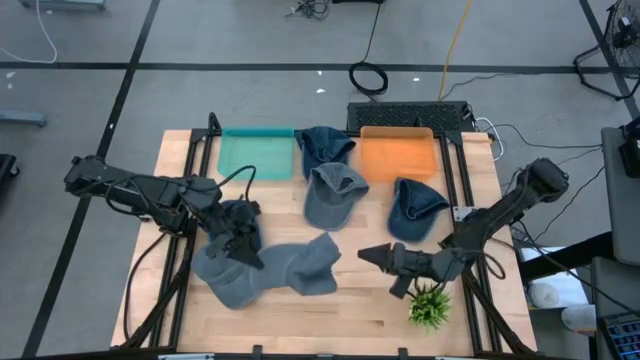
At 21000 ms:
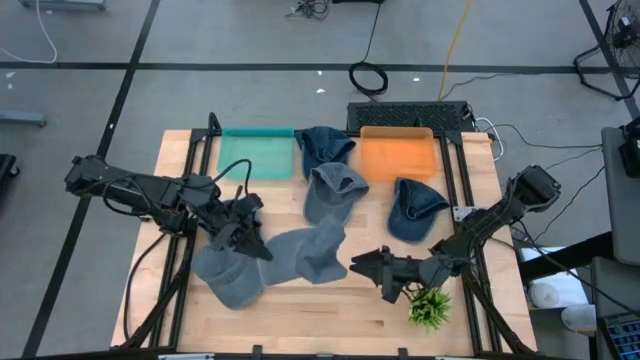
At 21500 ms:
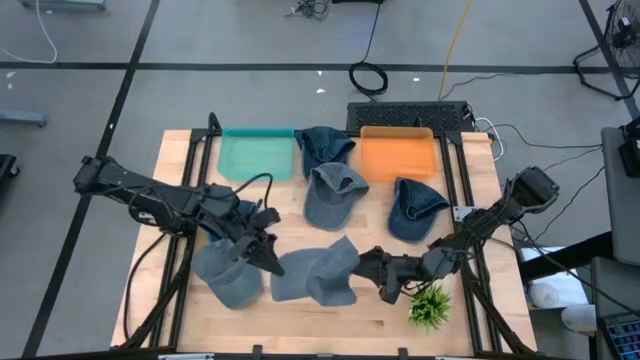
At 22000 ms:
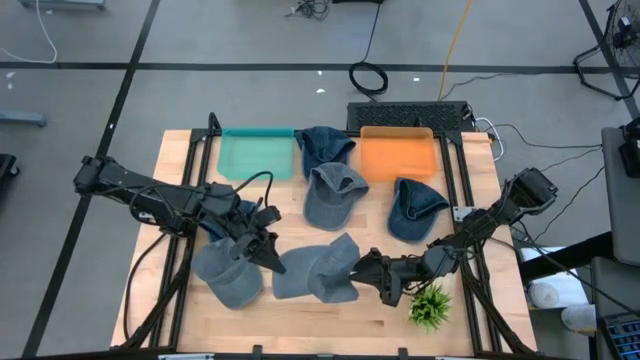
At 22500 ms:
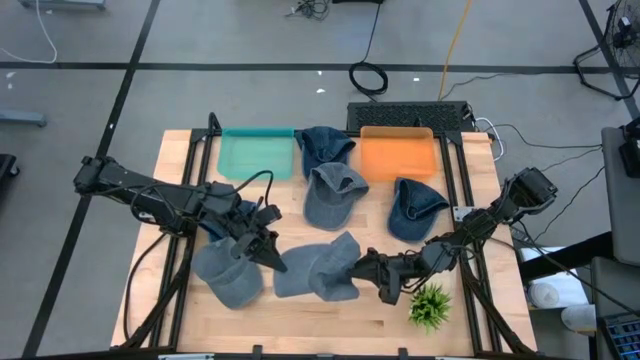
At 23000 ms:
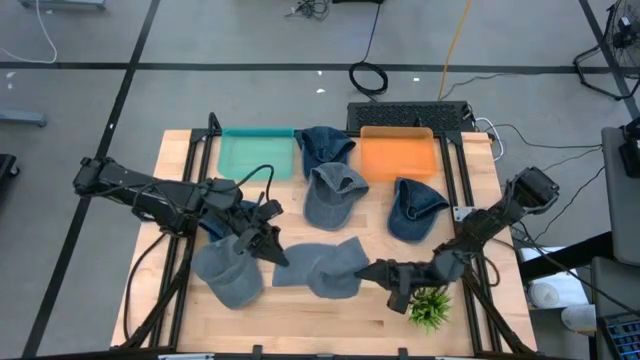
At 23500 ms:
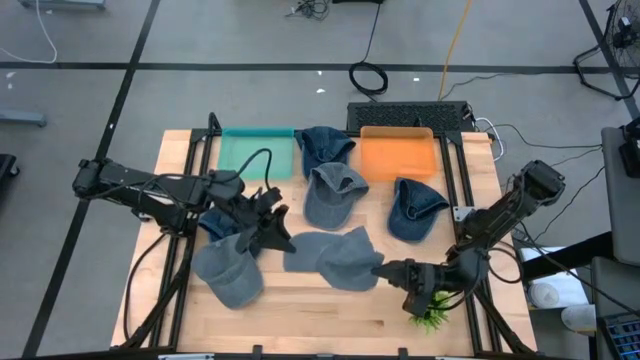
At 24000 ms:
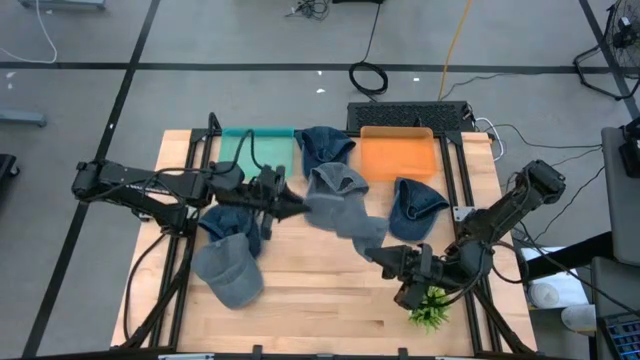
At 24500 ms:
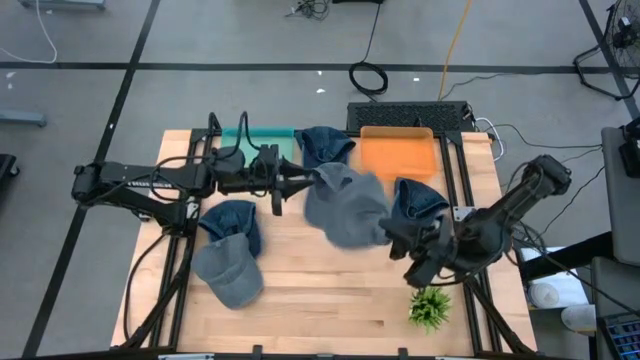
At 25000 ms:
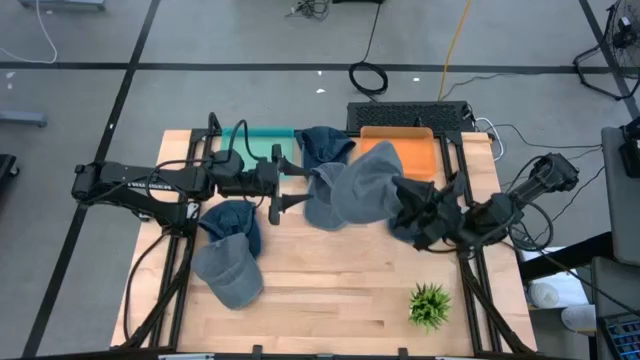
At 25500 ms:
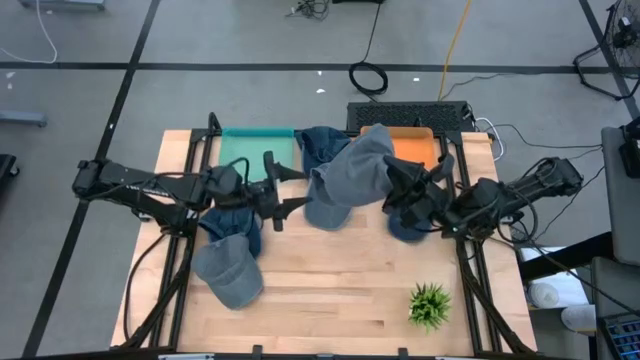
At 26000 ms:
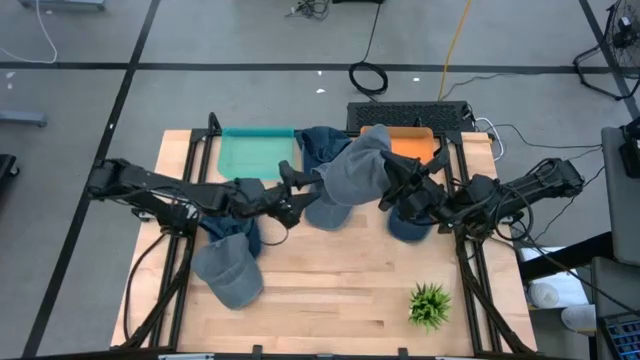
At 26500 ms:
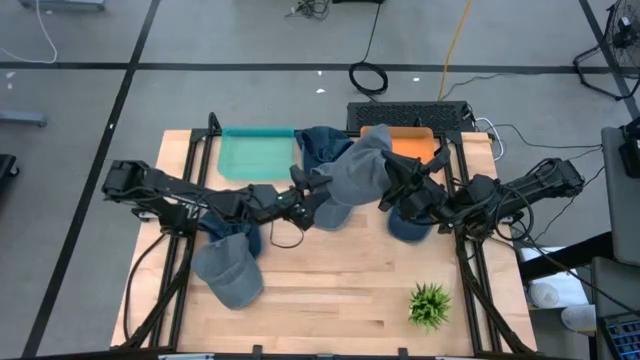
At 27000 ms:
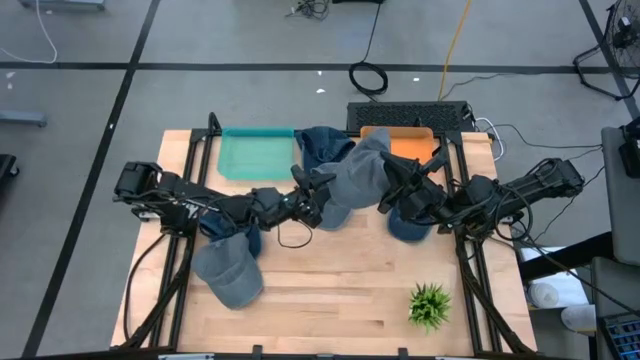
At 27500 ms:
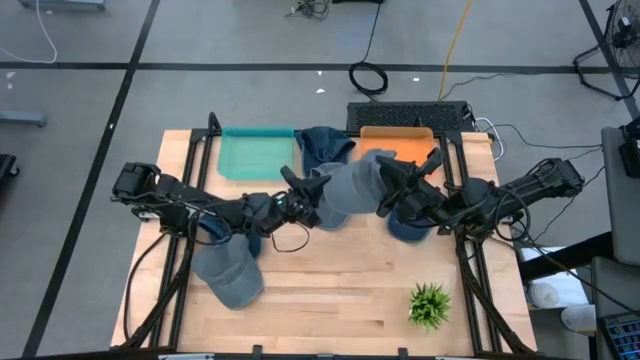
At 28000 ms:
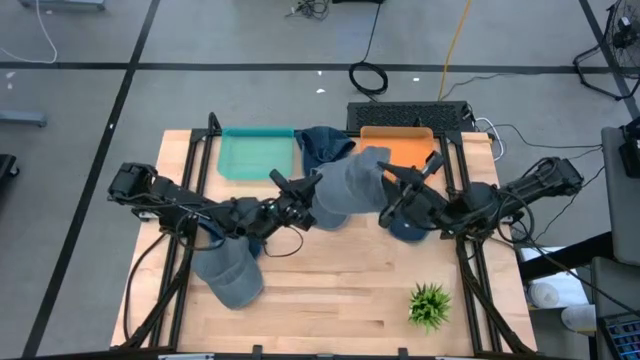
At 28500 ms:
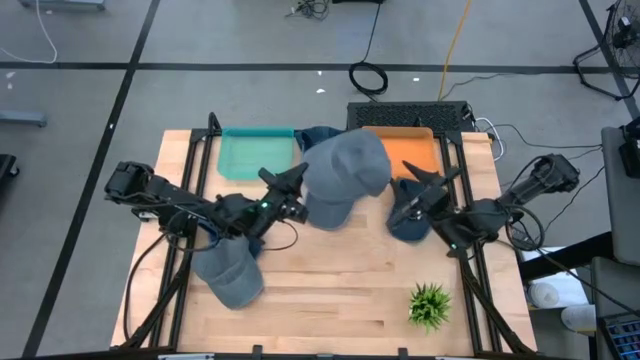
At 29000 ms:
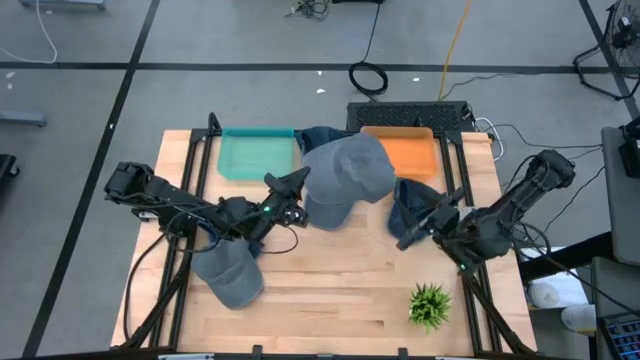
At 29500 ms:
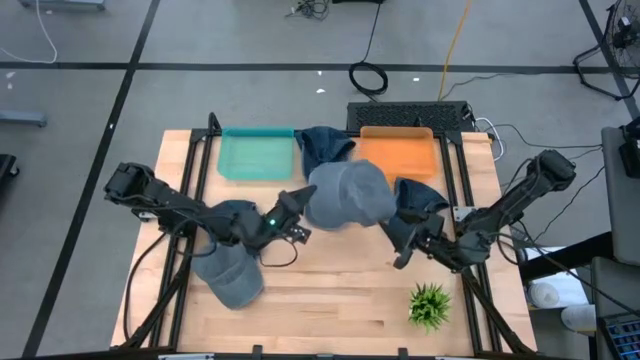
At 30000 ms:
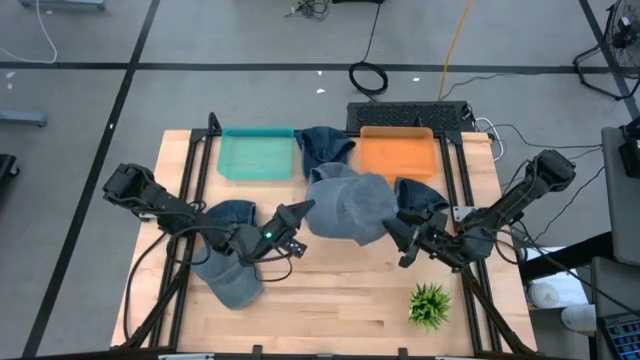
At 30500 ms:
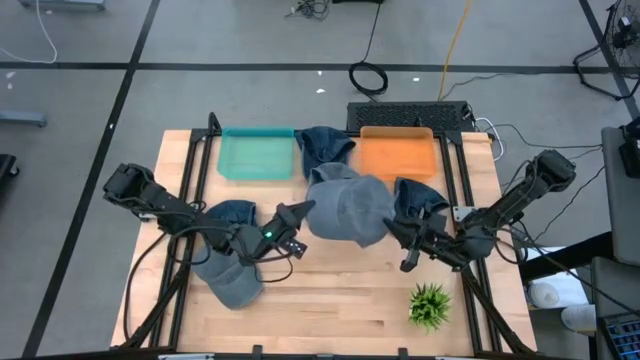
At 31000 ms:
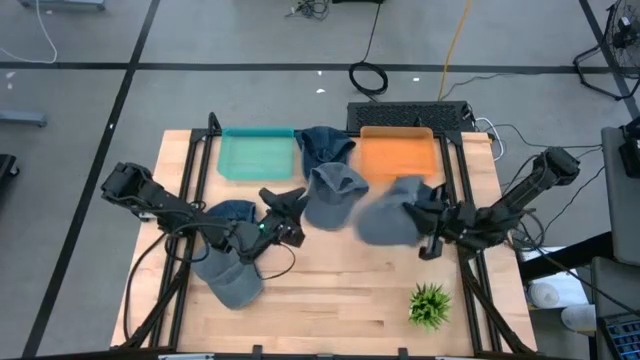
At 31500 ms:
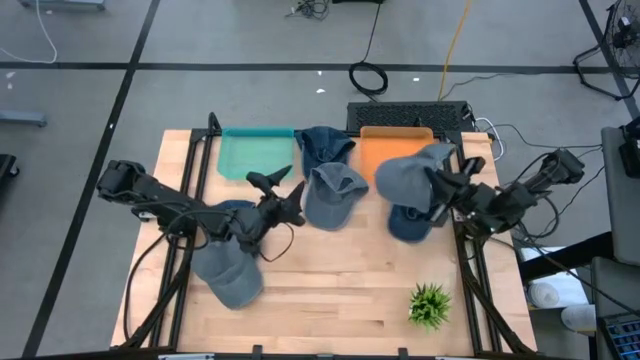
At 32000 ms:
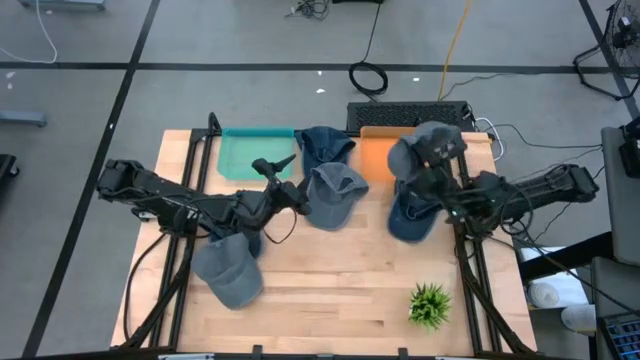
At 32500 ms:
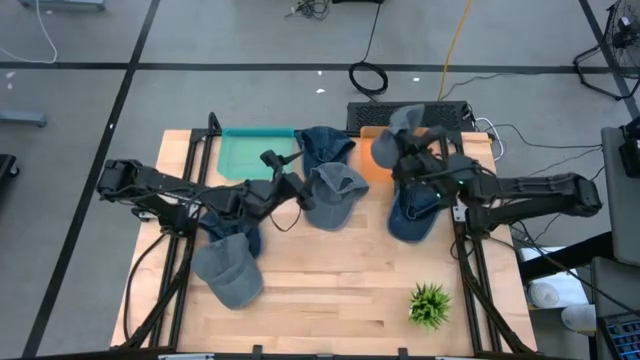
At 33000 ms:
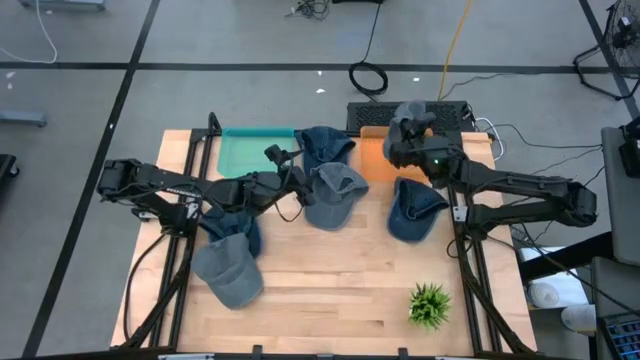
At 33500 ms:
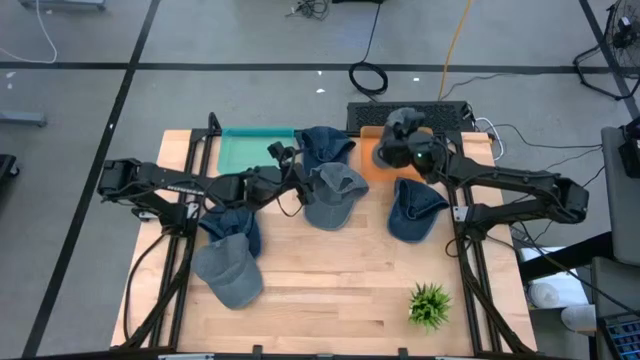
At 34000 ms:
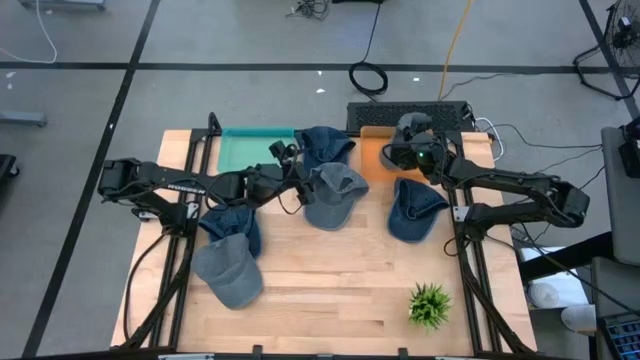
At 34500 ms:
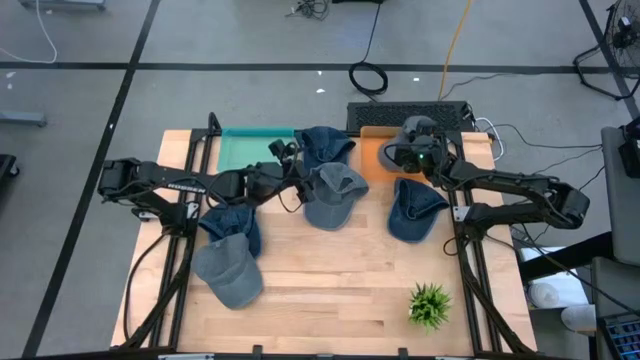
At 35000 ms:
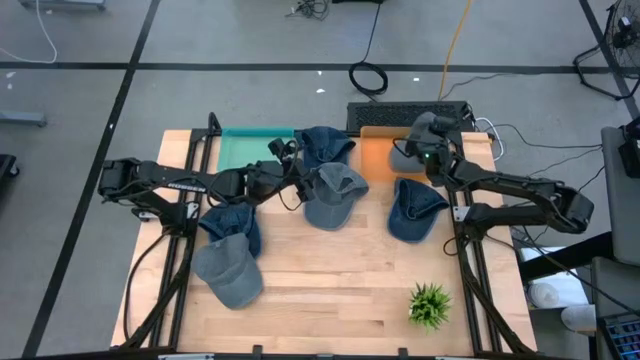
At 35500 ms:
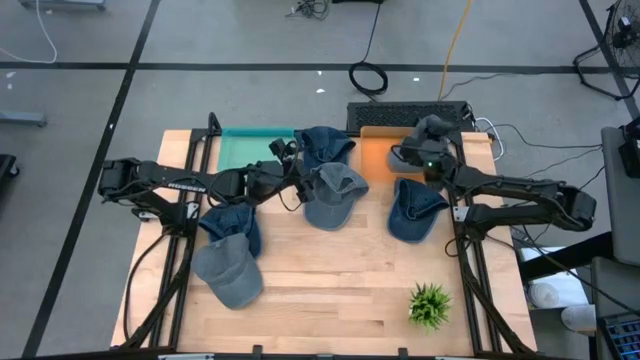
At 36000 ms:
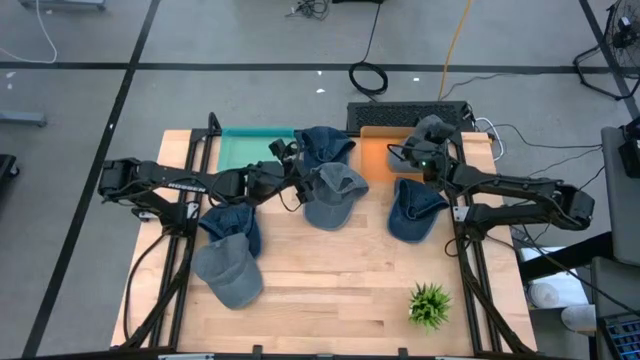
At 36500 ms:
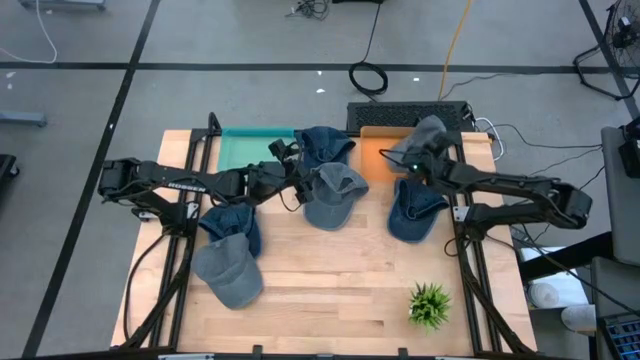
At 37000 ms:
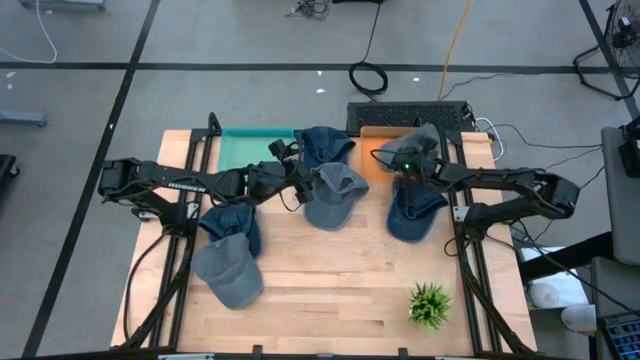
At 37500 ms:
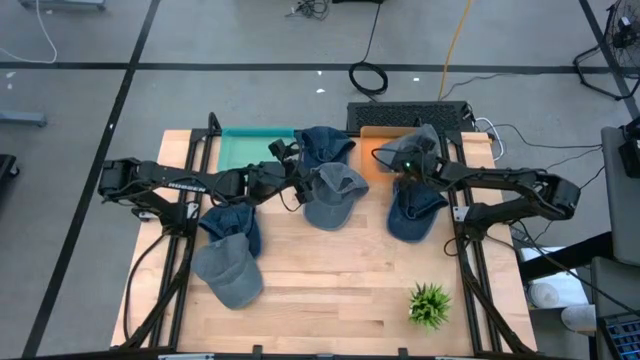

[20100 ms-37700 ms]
Task: Pick & Place hat
Put the top right gray cap into the orange bin

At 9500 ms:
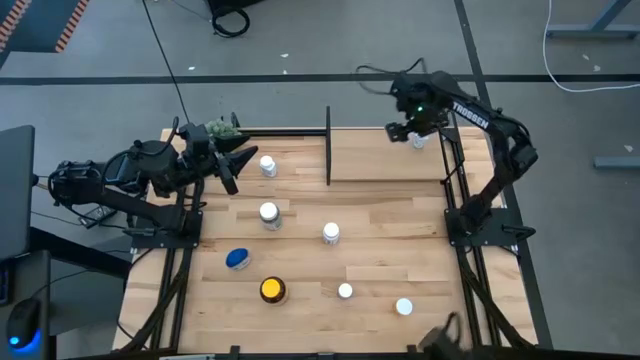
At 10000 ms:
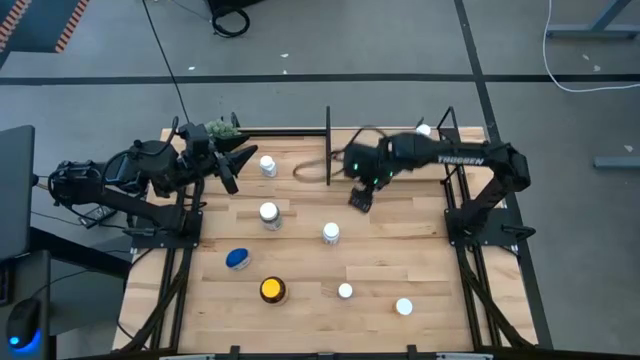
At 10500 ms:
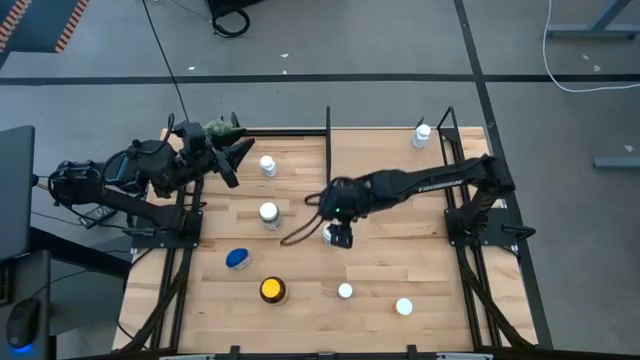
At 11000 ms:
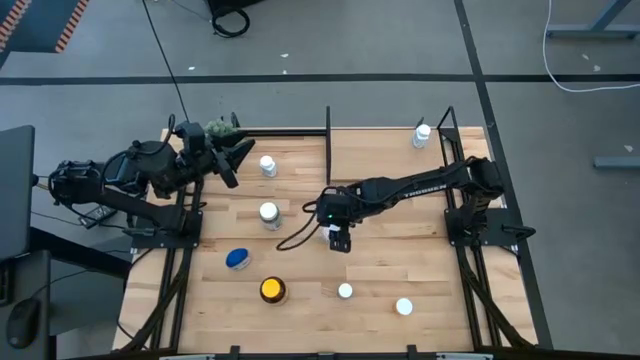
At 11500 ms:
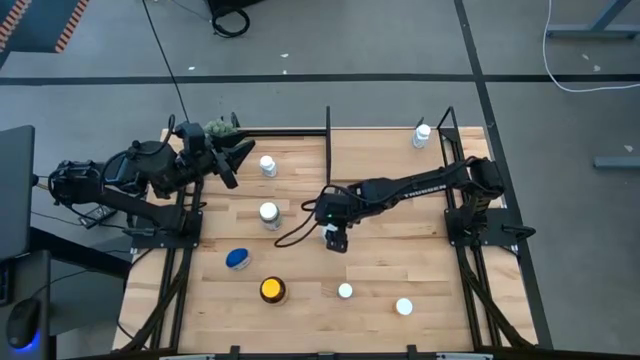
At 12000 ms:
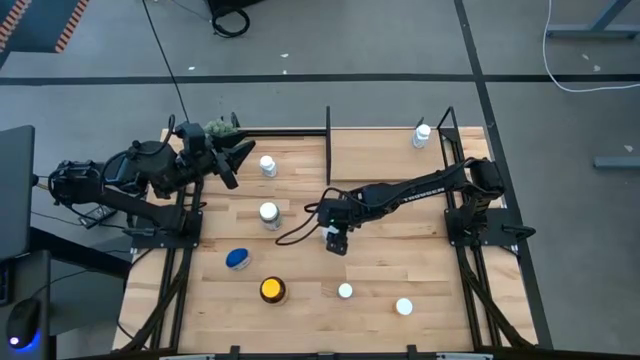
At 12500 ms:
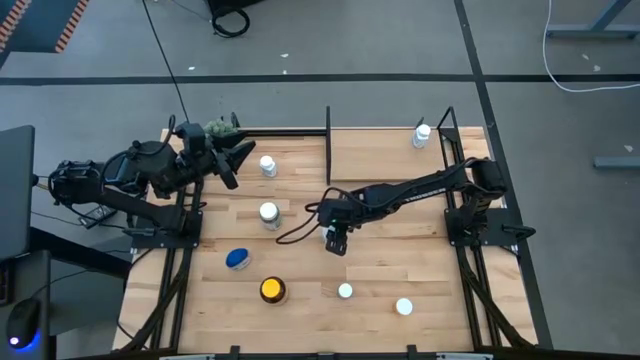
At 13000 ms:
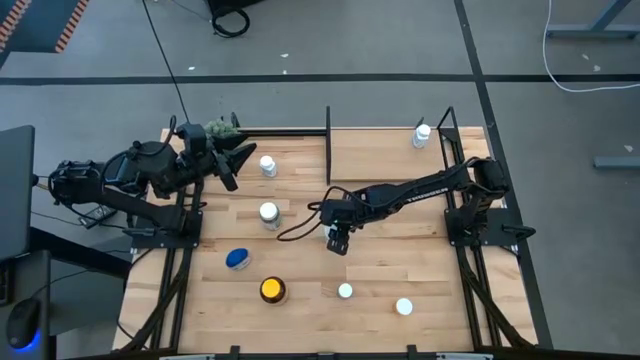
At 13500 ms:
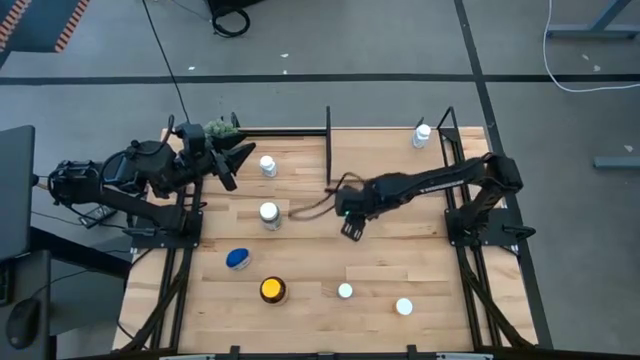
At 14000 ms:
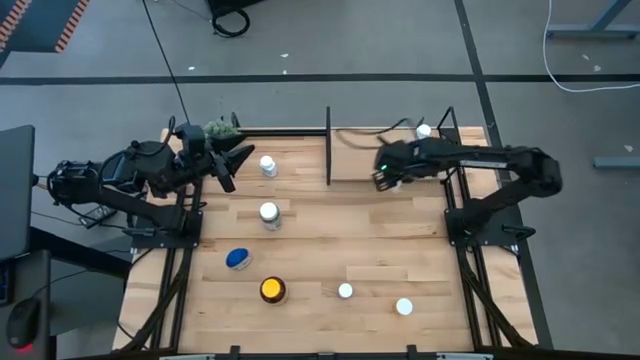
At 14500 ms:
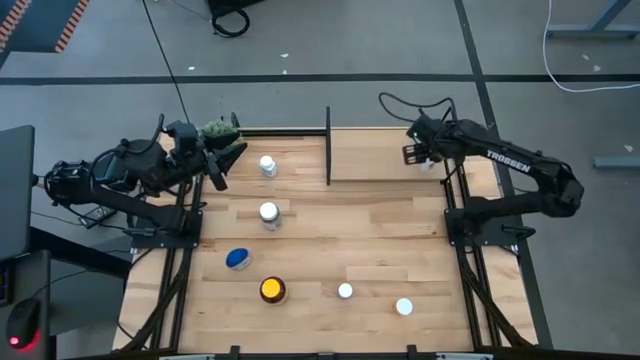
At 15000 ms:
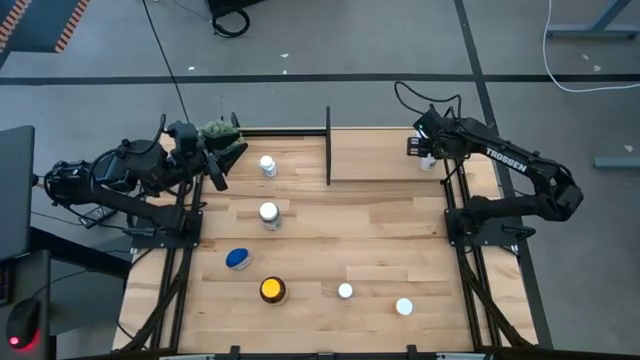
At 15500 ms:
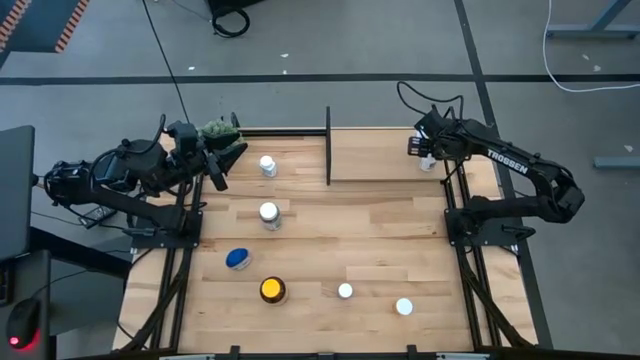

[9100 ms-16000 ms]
Task: Pick and place medicine bottles onto shelf by color
Put the white pill bottle on the shelf
